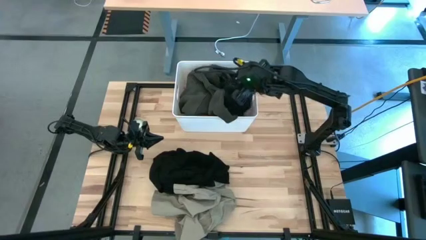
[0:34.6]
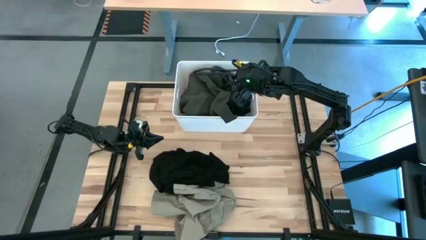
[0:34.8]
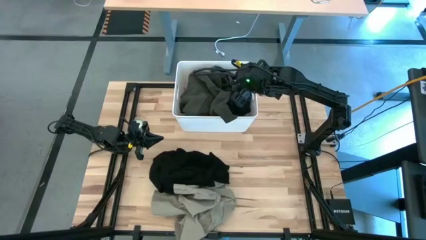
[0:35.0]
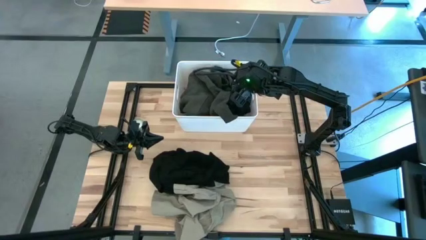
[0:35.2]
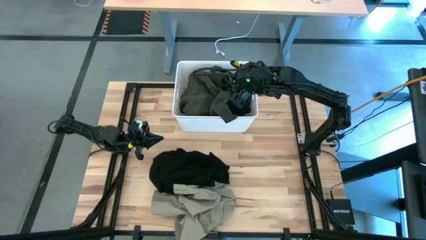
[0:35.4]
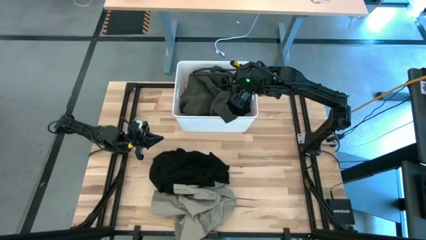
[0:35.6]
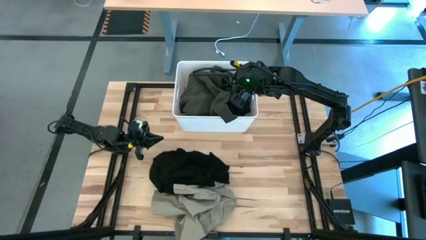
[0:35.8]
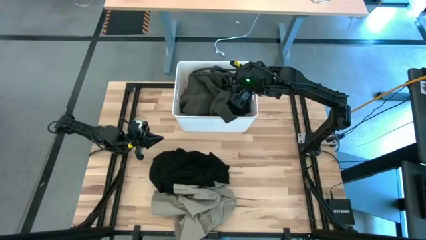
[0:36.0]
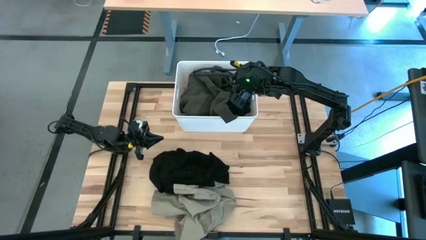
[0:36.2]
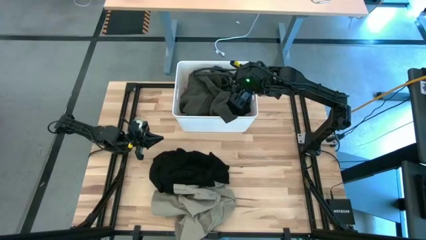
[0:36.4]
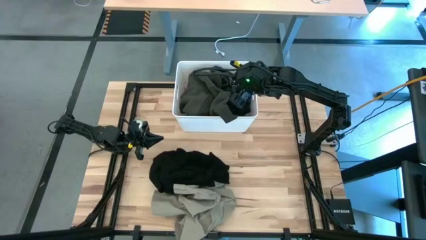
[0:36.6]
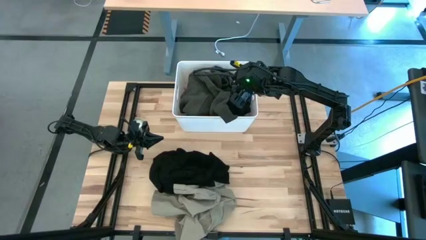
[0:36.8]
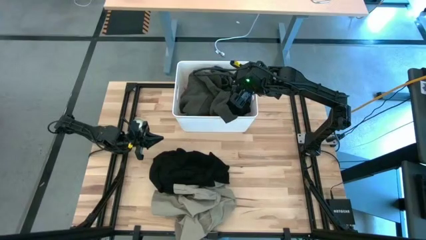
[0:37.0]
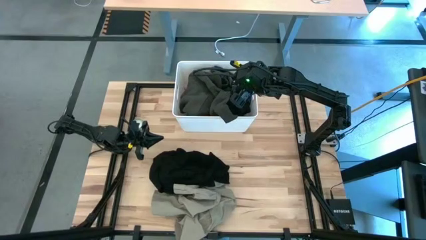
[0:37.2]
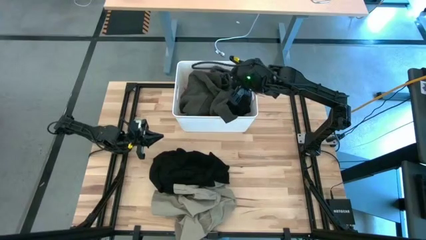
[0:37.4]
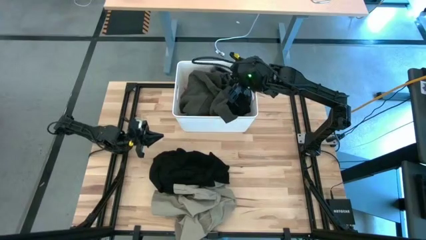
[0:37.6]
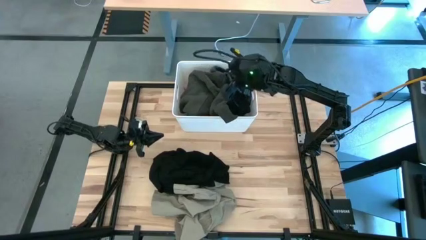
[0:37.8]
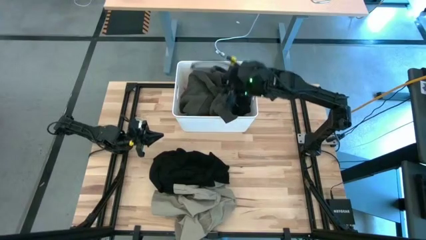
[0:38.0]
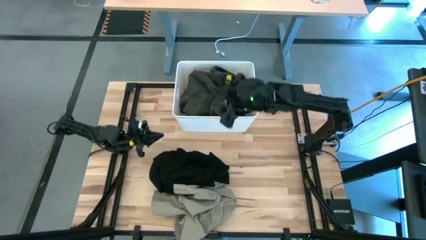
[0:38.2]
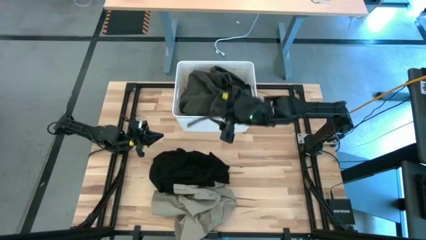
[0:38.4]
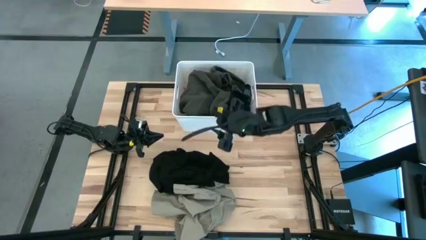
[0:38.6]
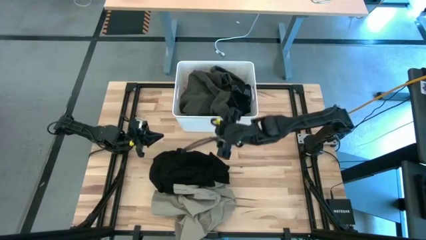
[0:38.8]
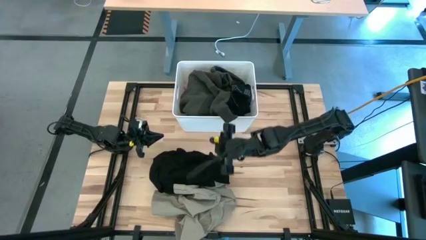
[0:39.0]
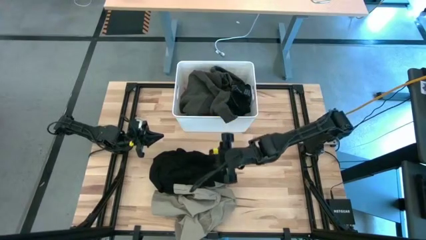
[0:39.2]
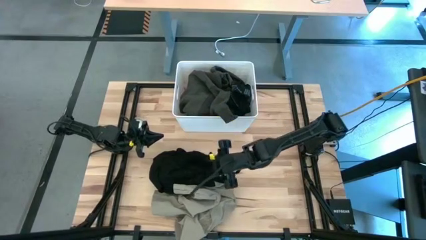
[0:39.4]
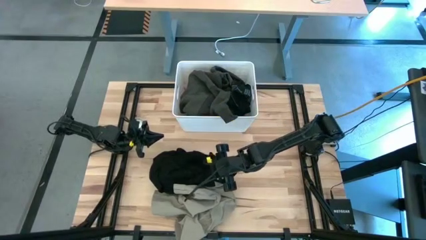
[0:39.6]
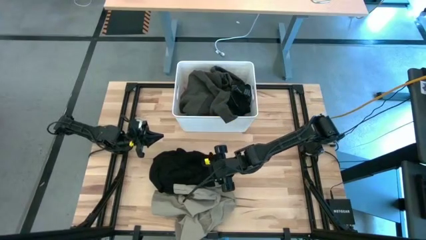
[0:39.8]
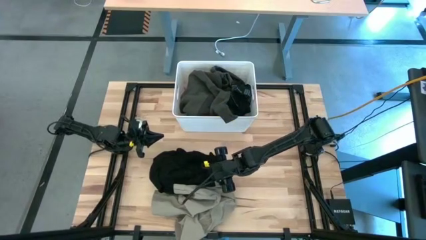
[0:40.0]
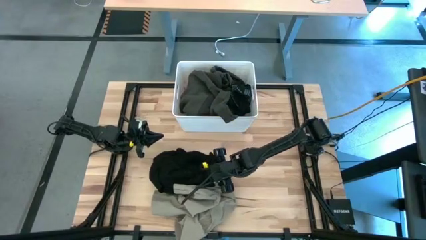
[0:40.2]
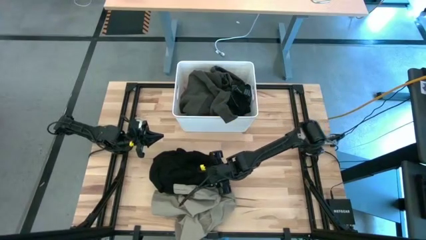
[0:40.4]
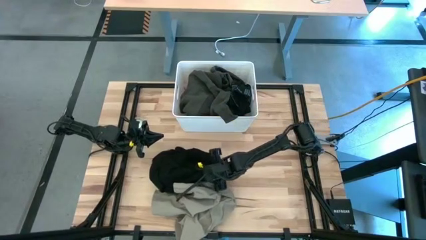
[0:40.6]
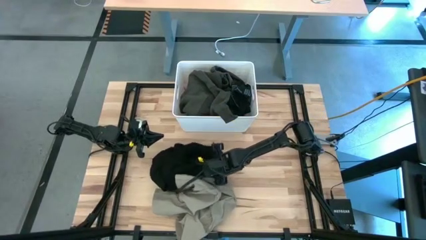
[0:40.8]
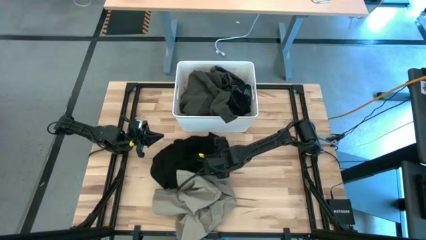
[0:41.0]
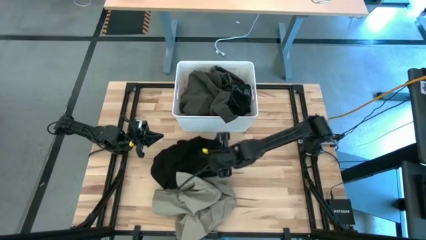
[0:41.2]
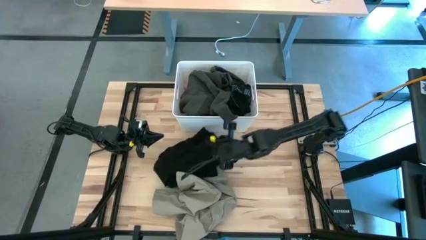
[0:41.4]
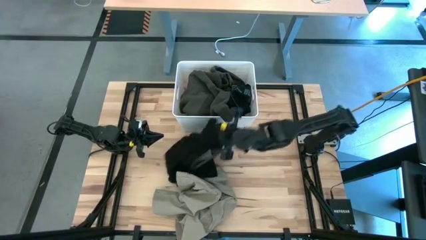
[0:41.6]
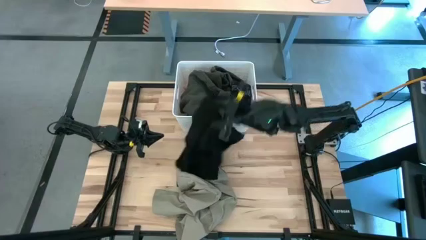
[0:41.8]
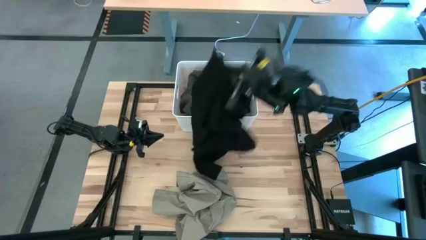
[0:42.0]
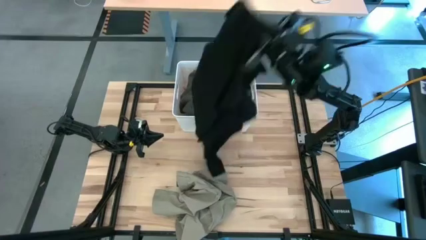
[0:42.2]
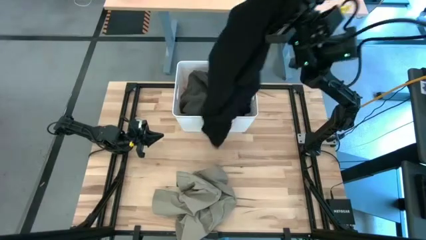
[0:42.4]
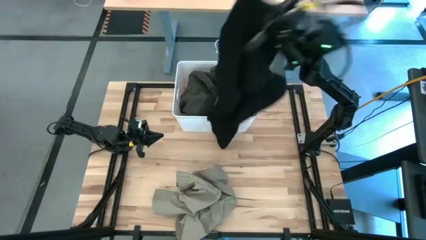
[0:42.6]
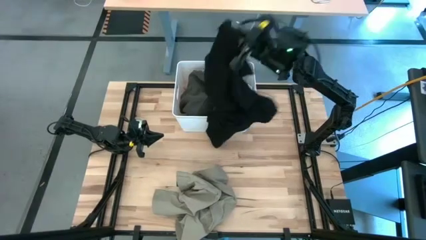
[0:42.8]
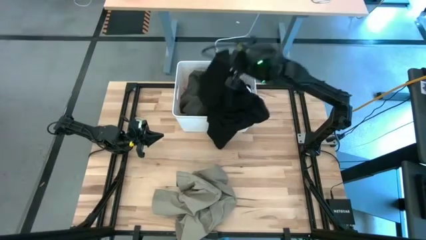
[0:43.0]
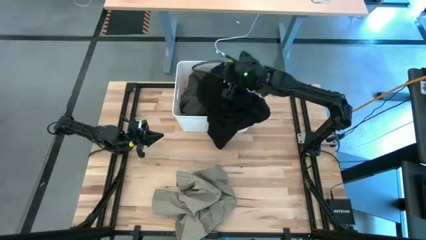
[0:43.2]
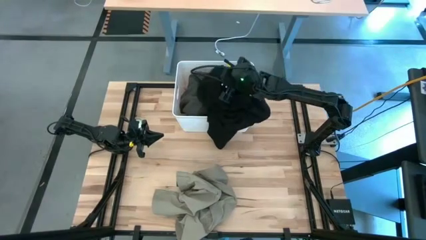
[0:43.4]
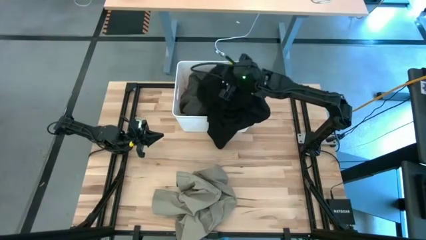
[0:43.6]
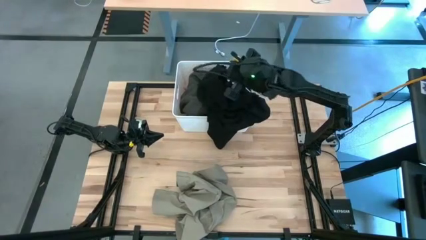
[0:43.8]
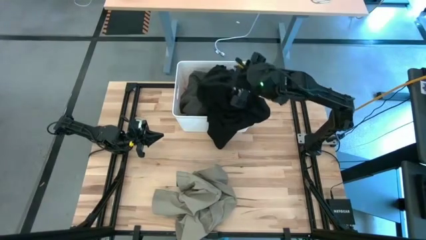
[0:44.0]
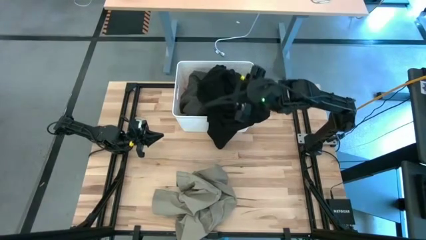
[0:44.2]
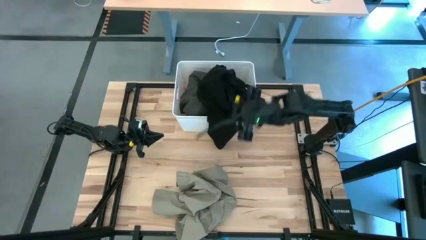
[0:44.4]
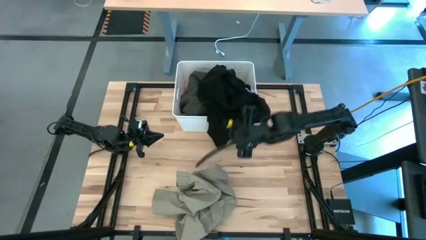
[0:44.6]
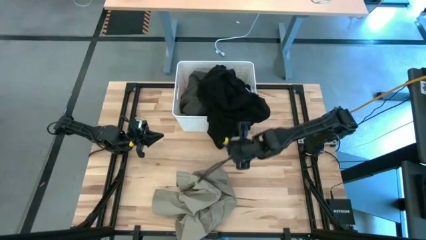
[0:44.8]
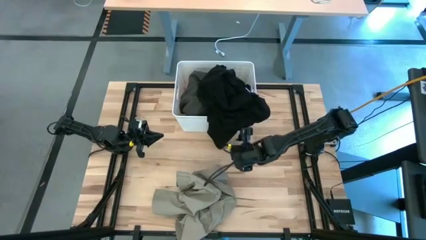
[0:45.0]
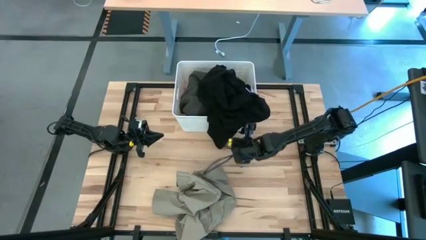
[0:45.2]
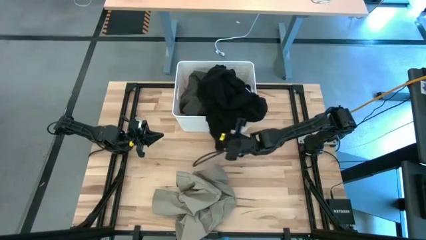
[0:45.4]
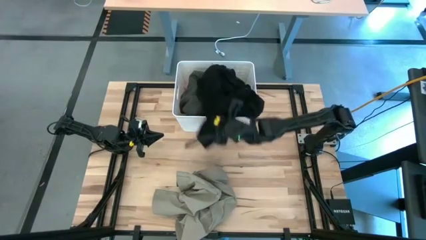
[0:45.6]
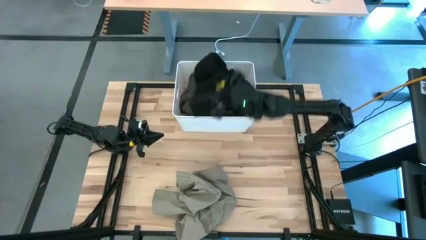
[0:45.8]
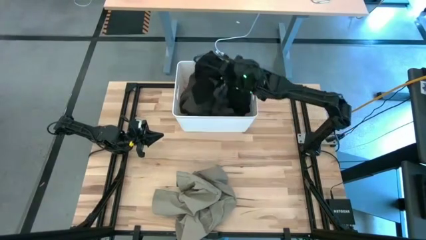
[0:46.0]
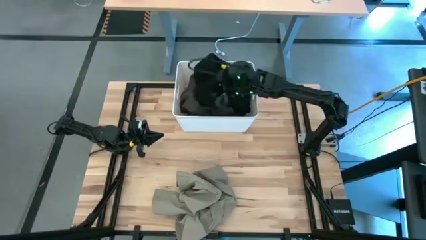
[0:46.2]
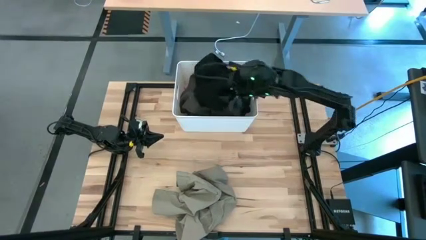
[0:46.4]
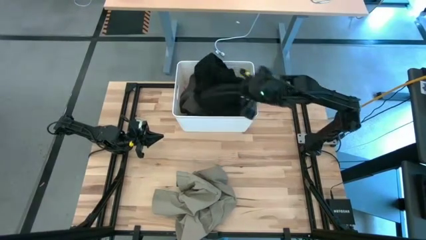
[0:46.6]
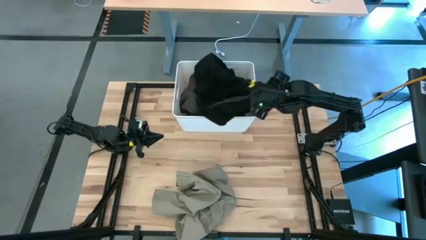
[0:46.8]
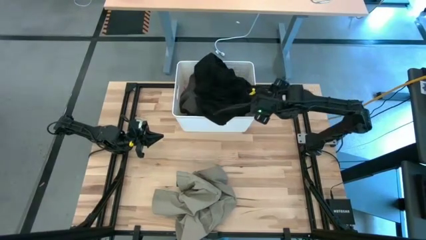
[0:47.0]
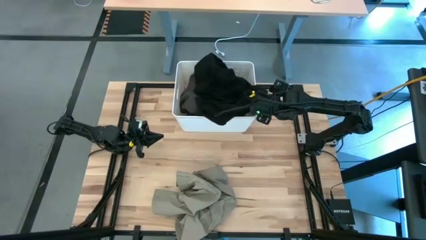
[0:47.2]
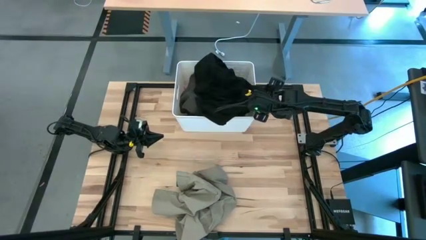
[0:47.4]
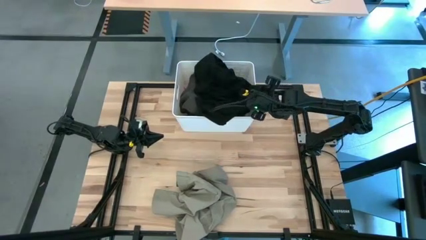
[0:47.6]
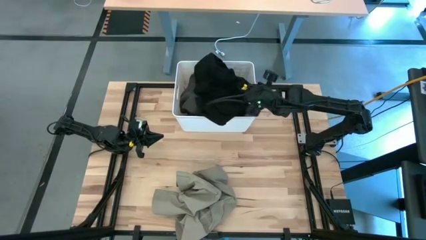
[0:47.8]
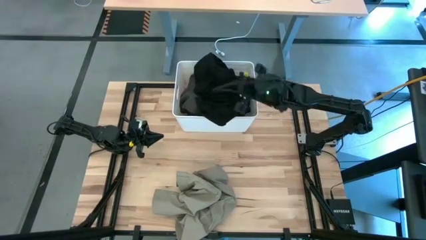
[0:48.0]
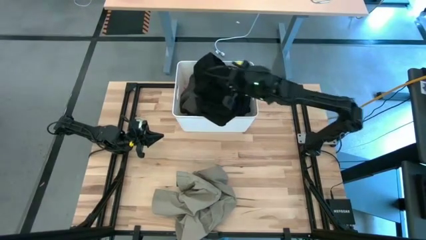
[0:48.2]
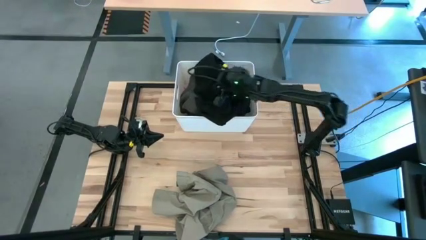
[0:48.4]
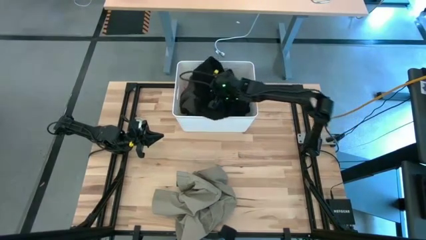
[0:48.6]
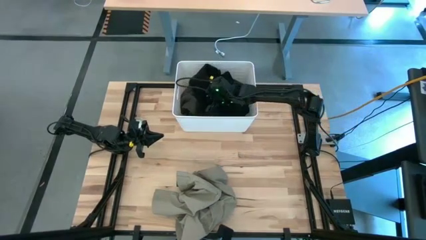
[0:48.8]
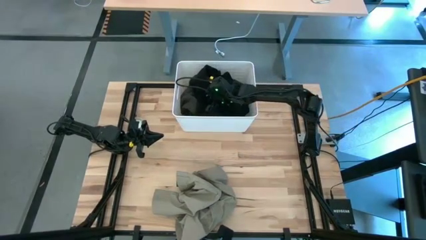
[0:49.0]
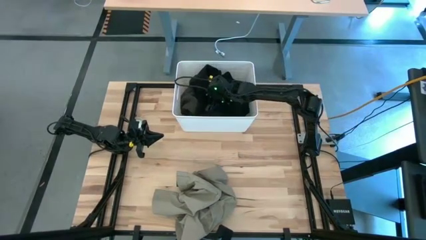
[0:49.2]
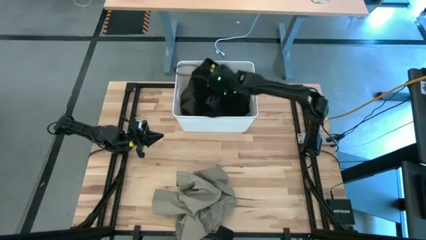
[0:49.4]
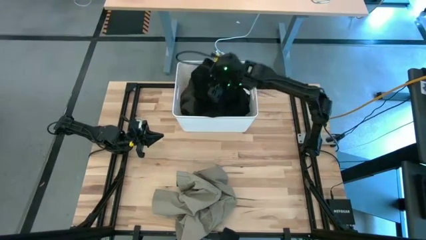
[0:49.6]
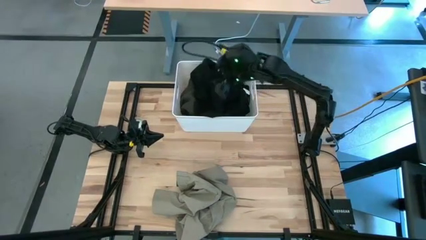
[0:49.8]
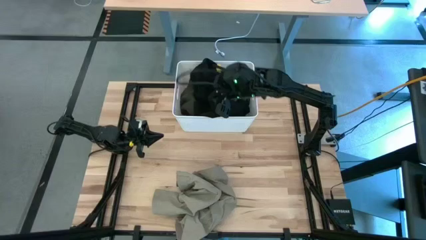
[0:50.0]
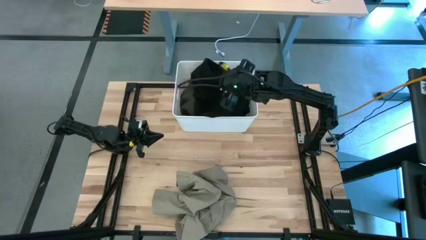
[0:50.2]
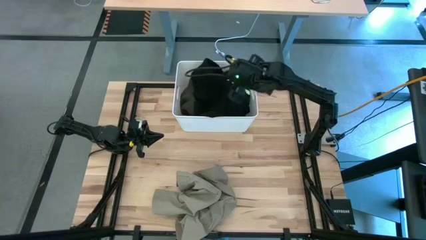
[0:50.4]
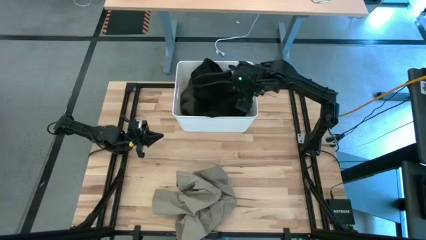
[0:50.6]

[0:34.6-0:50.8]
Task: Sort clothes
Put the black shirt into the white laundry bin
